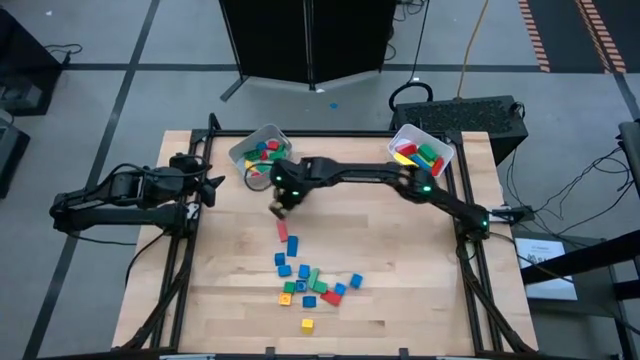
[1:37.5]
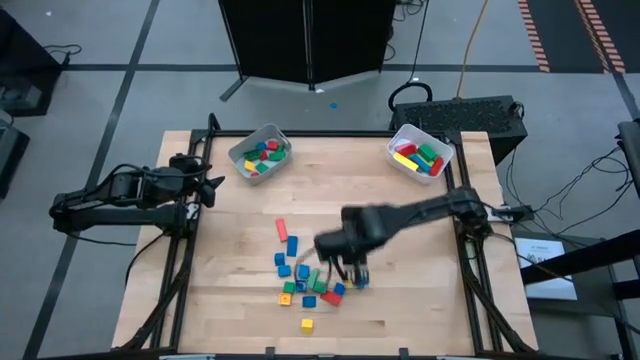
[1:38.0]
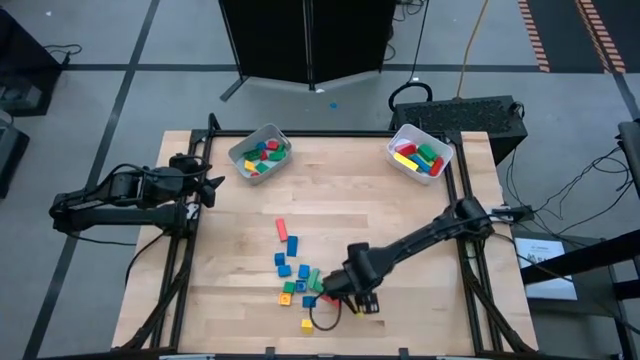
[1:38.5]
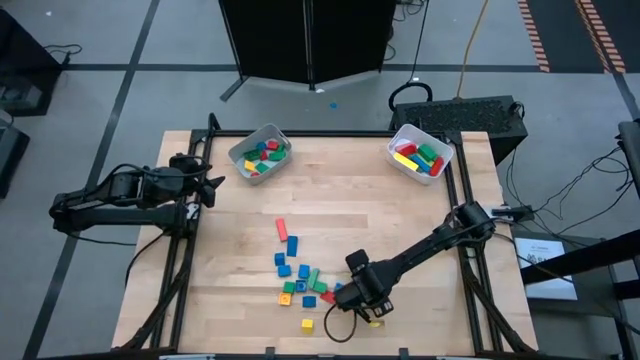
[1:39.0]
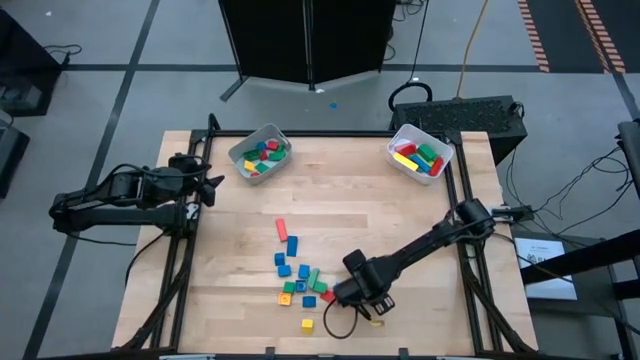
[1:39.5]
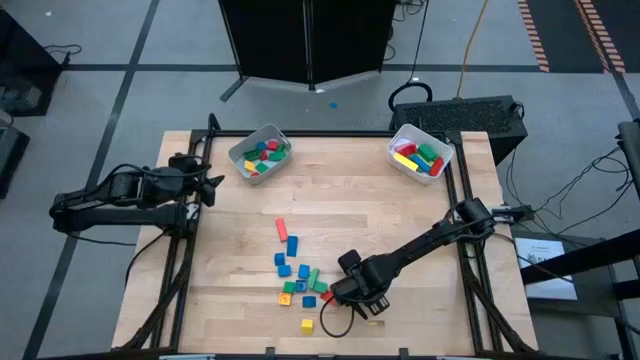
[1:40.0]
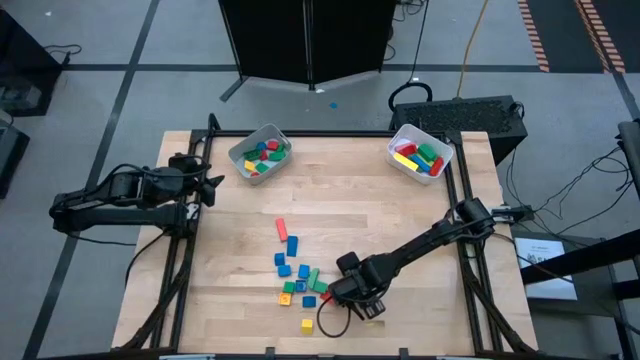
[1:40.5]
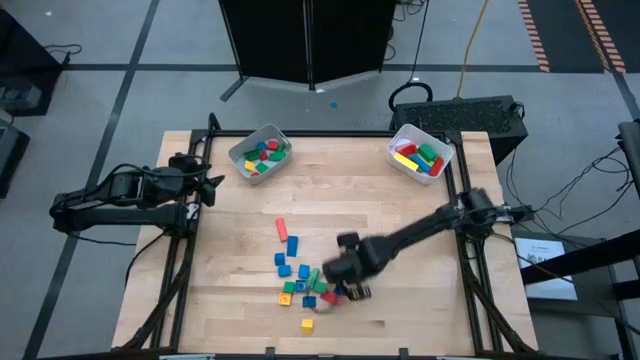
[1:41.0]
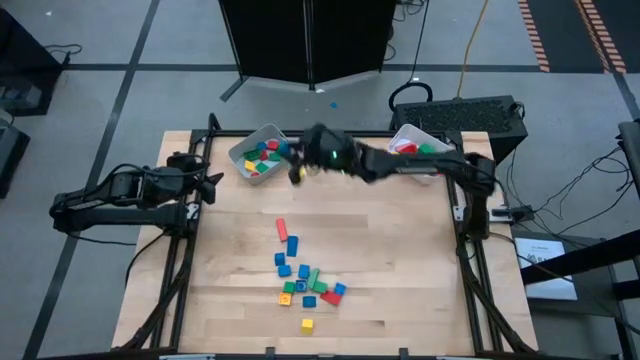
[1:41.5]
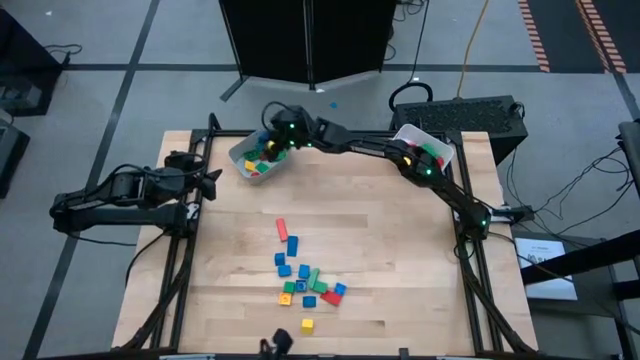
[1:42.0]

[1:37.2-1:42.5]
Task: Sort blocks by size
Put the half cylindrical blue block into the gray bin

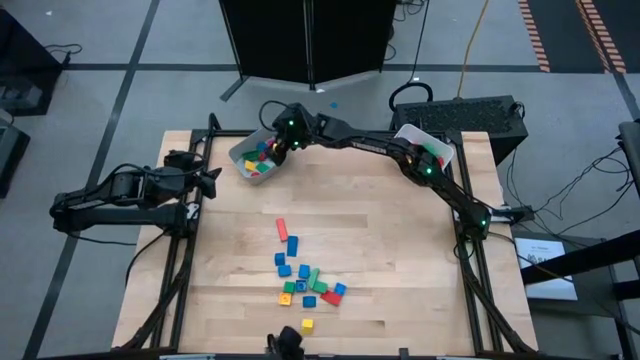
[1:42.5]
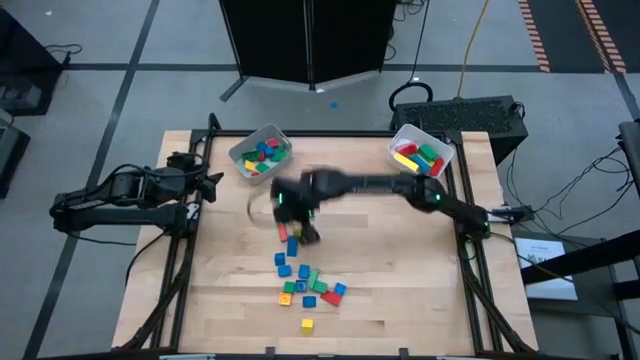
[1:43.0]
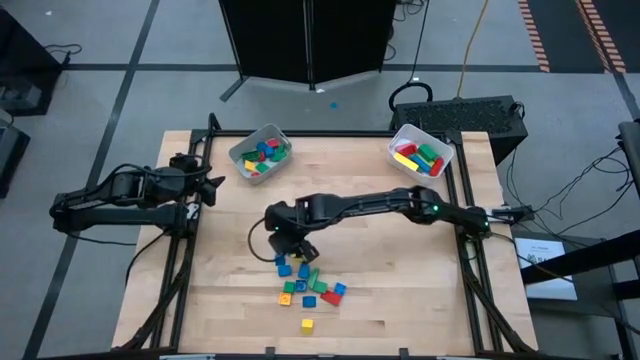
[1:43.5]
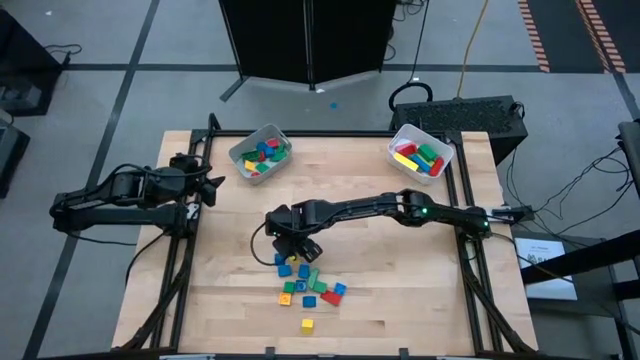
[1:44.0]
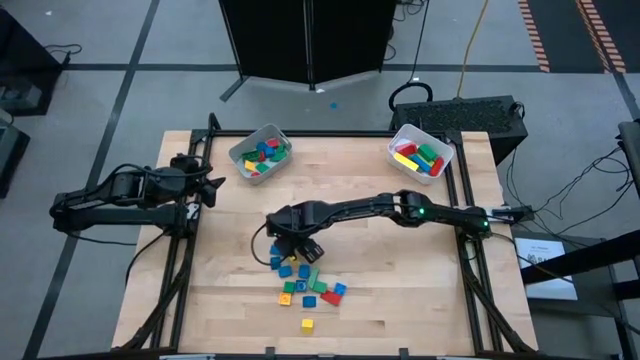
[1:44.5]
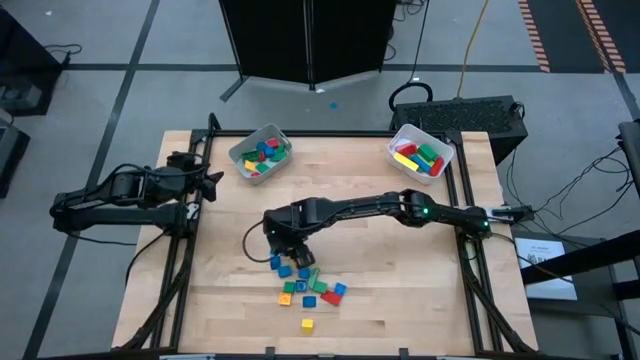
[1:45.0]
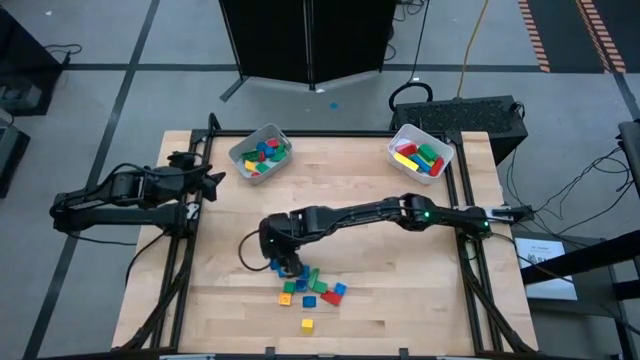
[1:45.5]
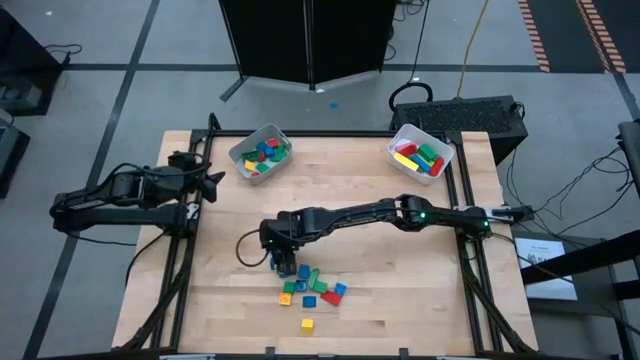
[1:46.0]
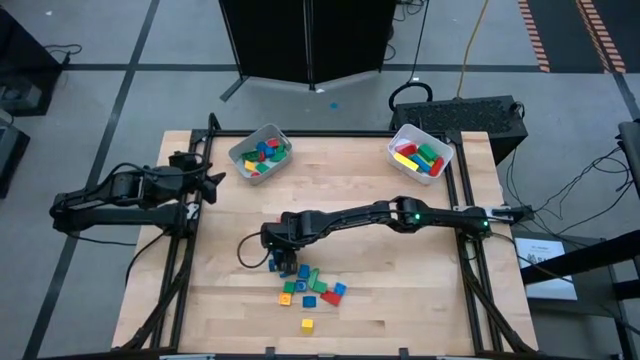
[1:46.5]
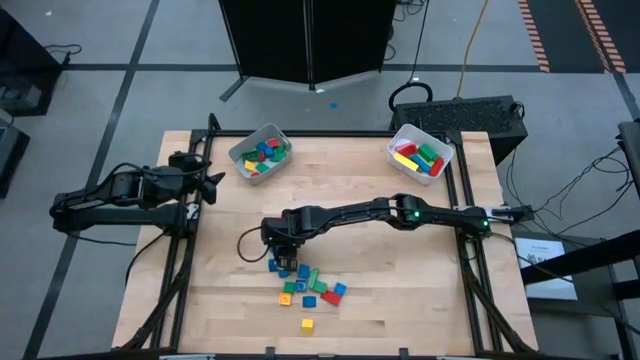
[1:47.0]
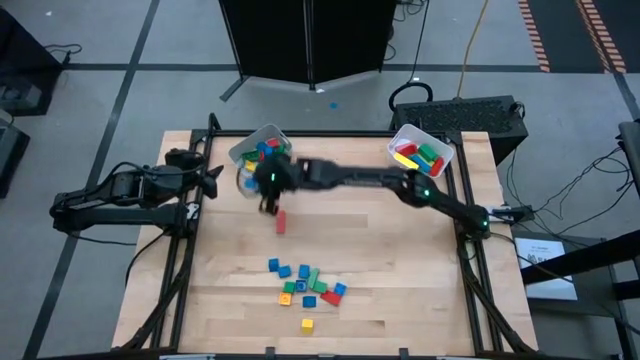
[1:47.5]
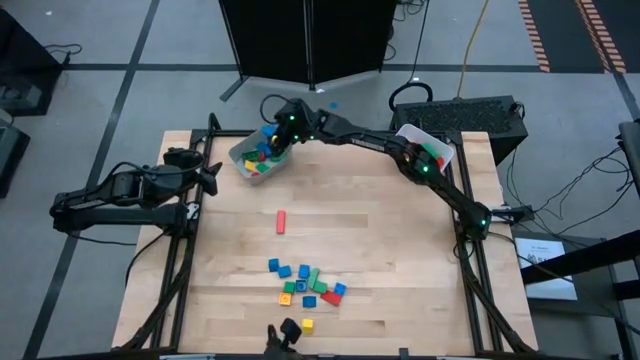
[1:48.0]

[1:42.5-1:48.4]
Put the triangular blue block into the gray bin

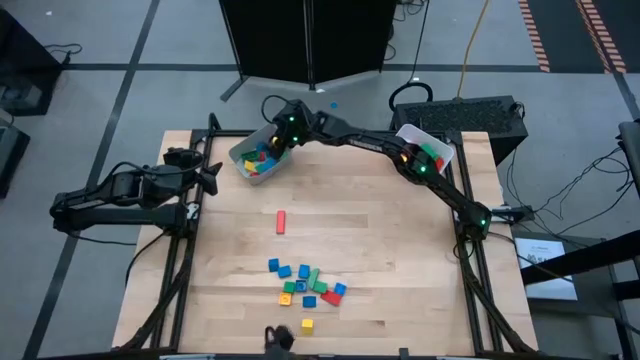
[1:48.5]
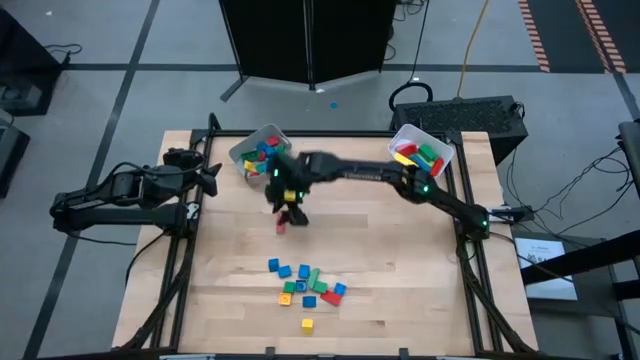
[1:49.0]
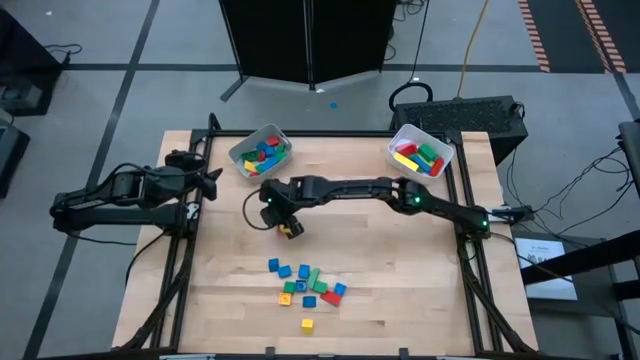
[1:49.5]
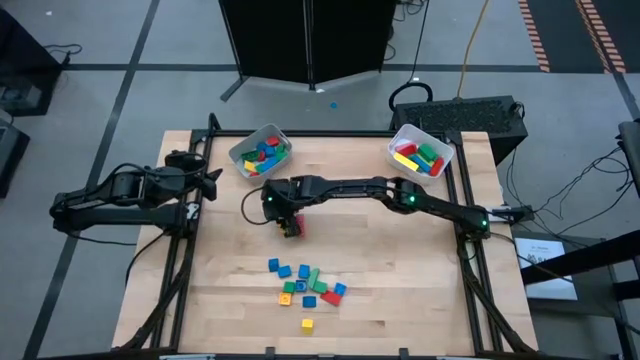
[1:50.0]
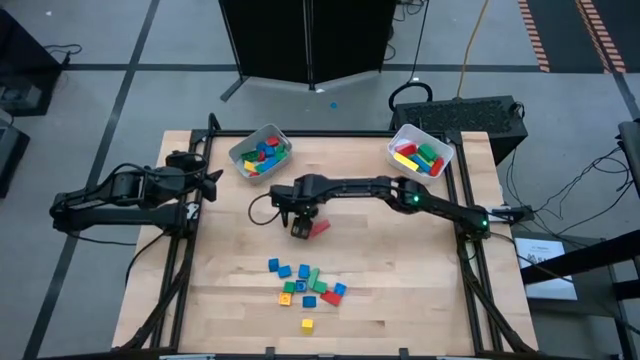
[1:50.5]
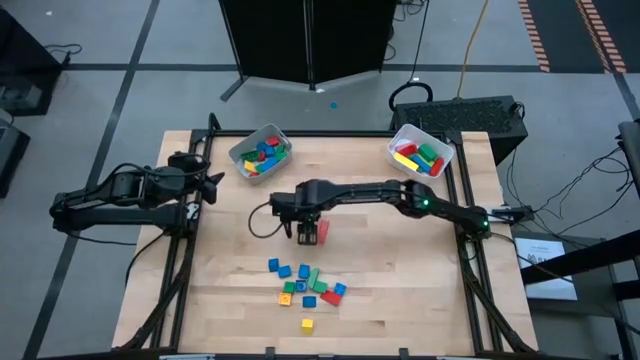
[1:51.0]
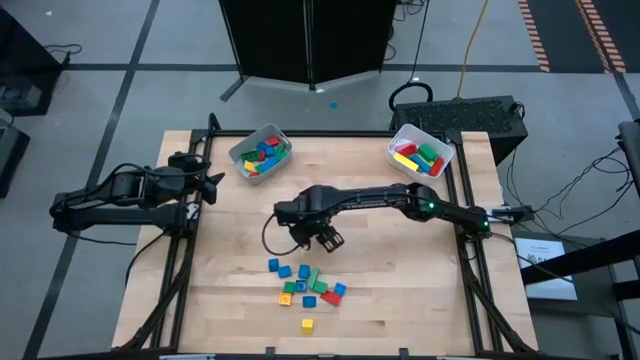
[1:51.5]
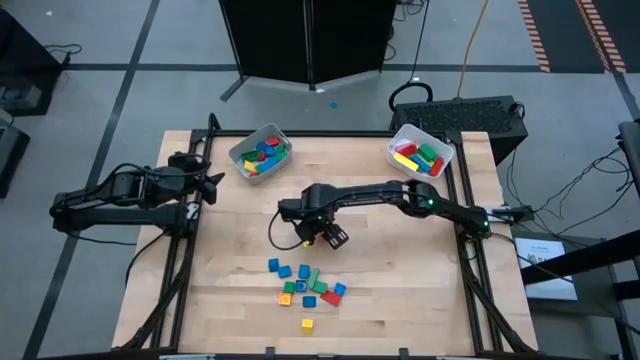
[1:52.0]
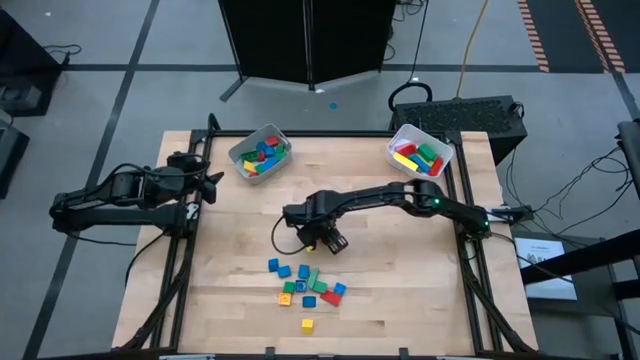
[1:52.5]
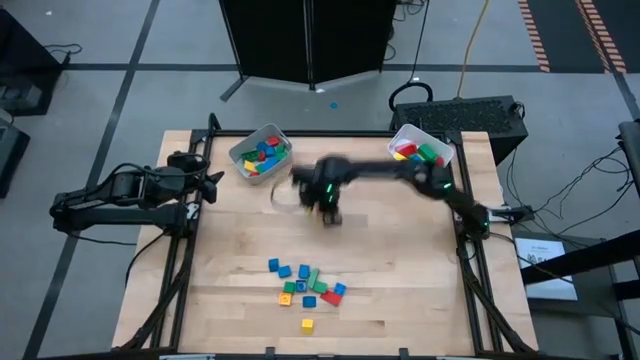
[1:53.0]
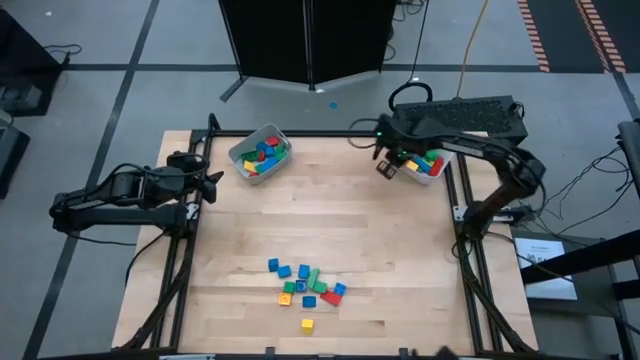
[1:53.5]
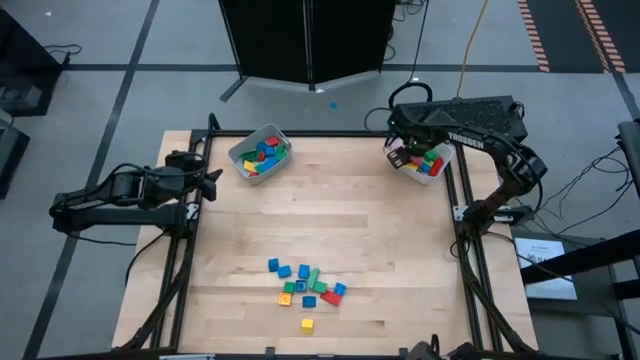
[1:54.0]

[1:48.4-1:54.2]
Put the rectangular red block into the white bin

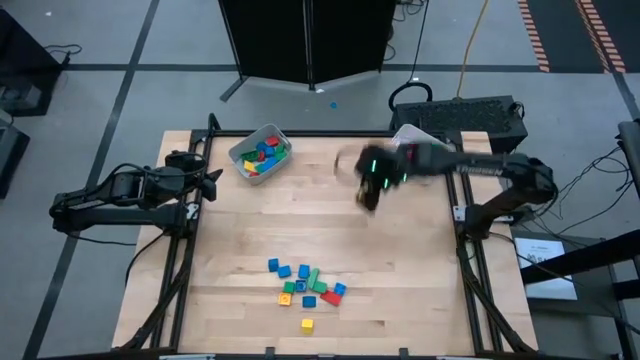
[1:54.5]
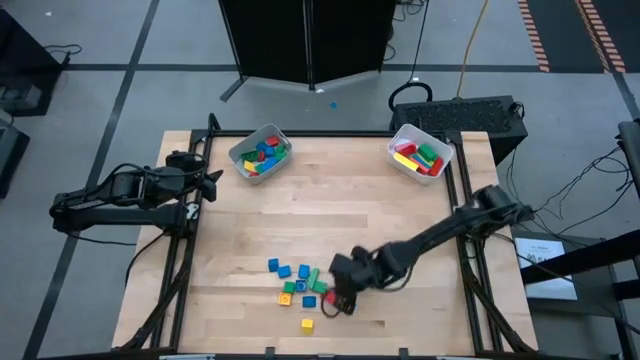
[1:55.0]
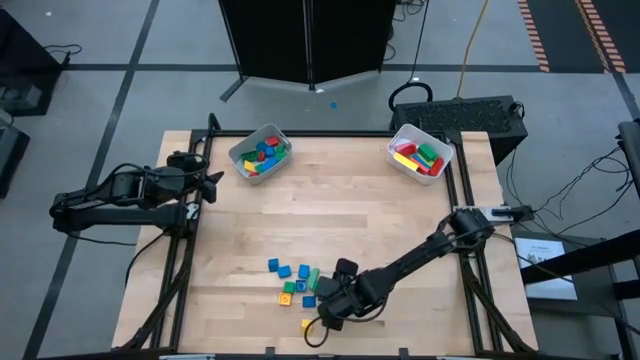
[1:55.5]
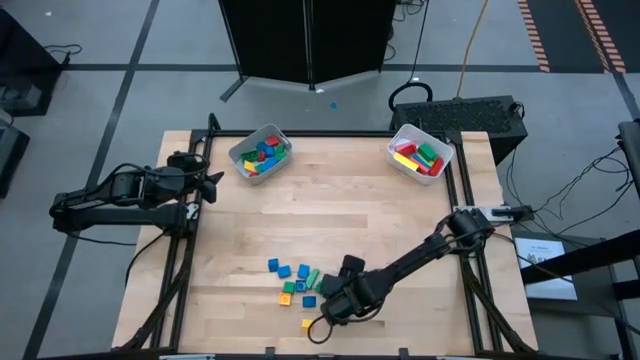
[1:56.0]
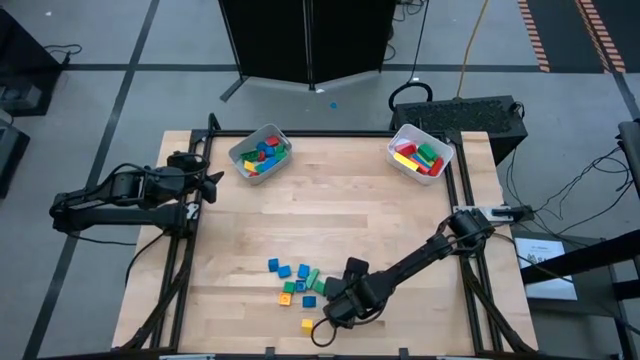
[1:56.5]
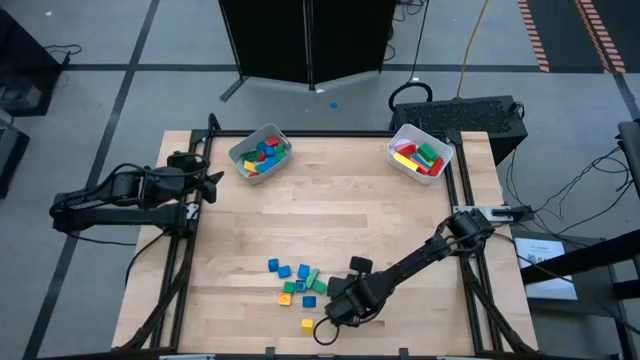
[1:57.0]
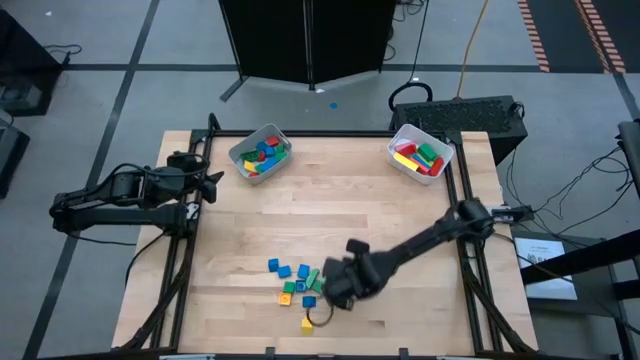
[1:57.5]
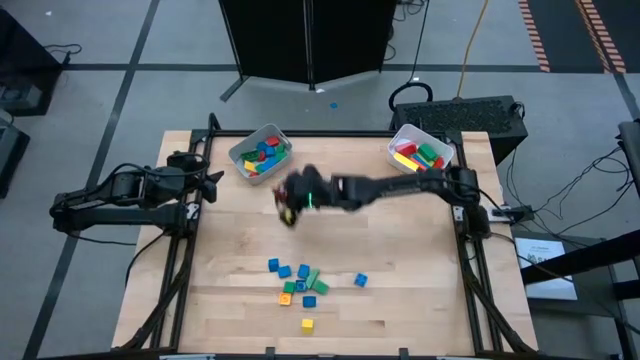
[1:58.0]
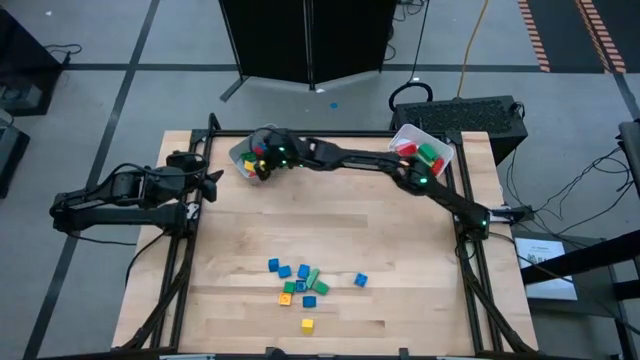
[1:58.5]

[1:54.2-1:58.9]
Put the triangular red block into the gray bin

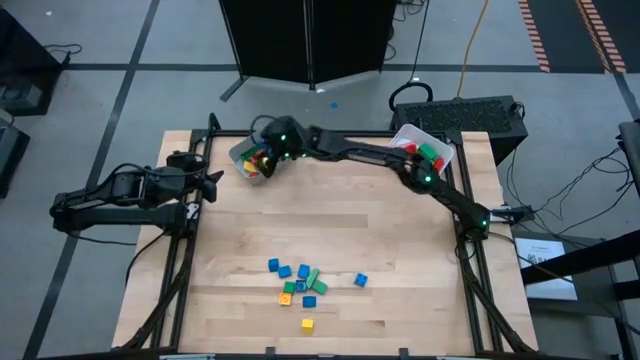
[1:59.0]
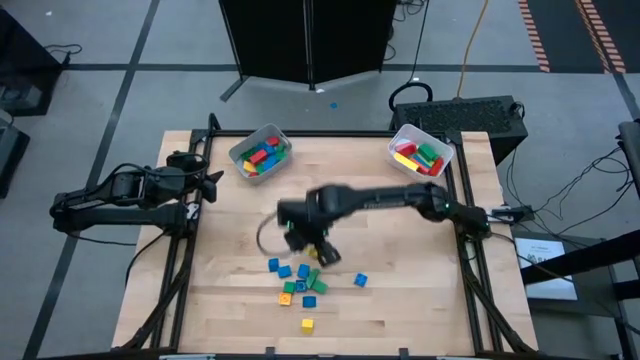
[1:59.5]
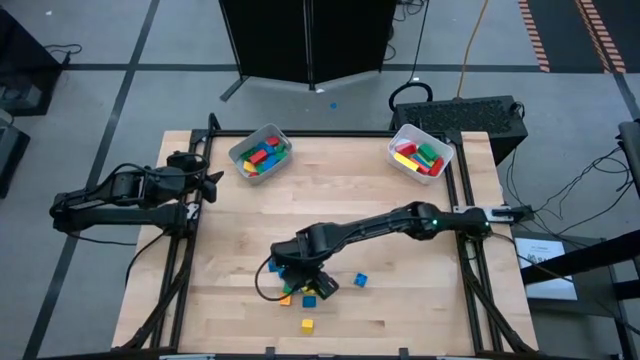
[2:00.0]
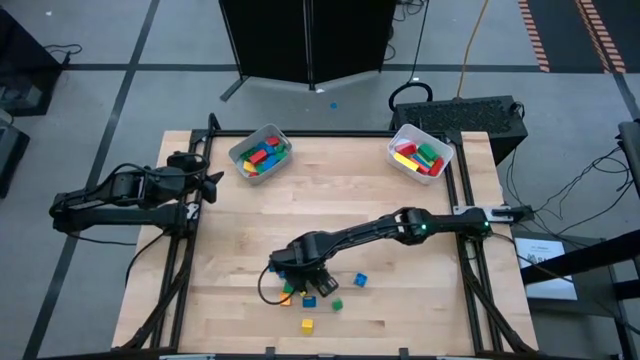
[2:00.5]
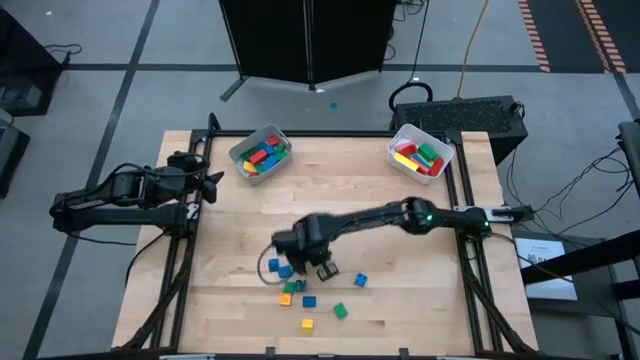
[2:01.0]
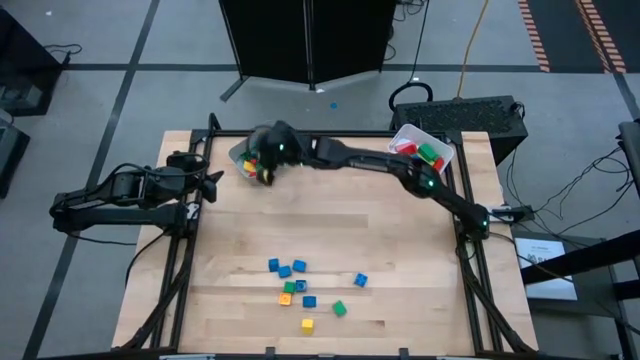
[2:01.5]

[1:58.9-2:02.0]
Put the 4 stud green game piece into the gray bin
